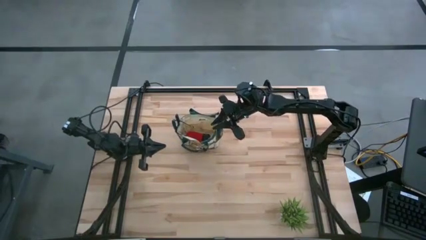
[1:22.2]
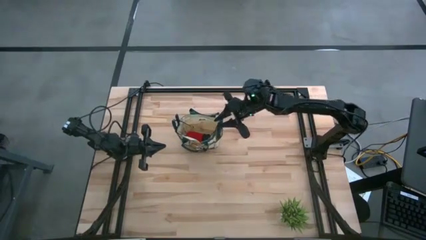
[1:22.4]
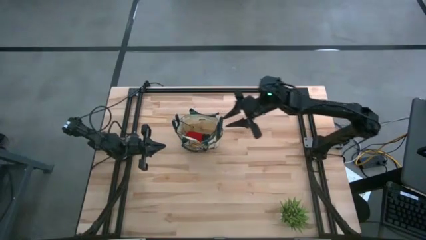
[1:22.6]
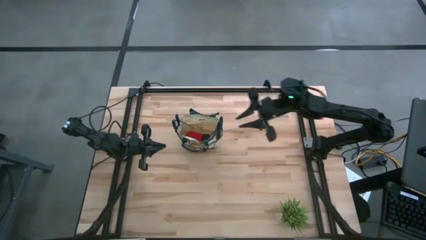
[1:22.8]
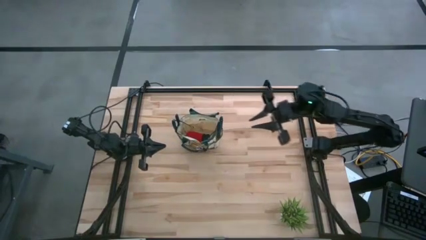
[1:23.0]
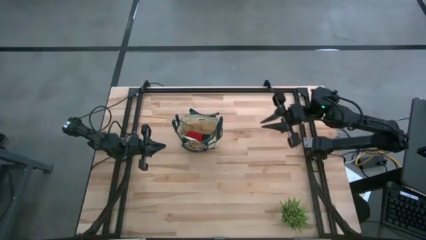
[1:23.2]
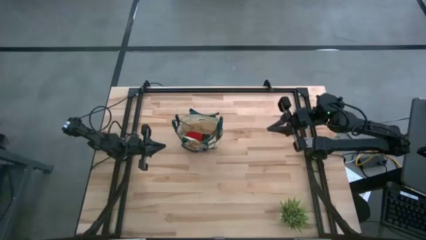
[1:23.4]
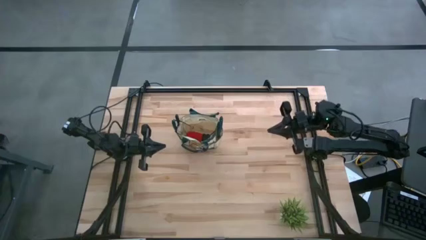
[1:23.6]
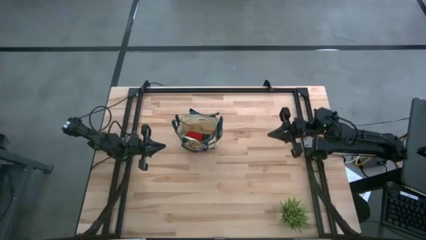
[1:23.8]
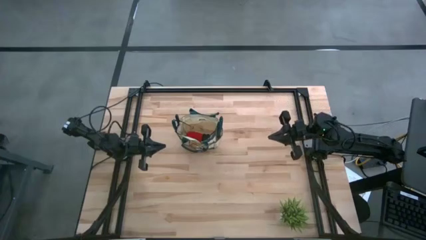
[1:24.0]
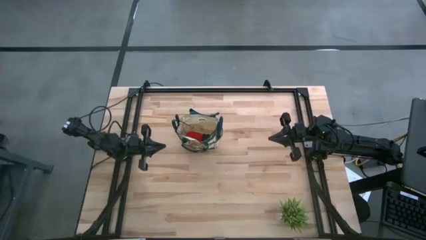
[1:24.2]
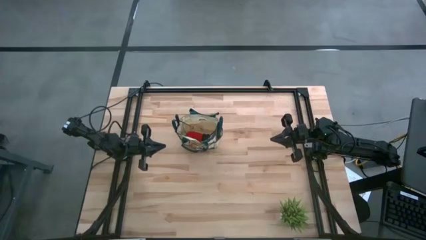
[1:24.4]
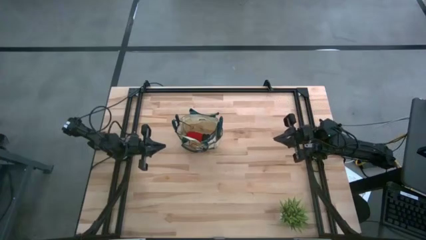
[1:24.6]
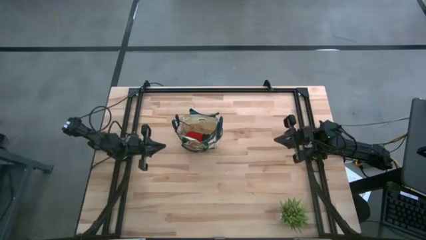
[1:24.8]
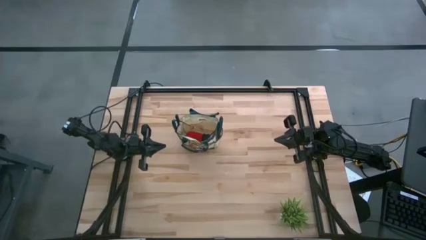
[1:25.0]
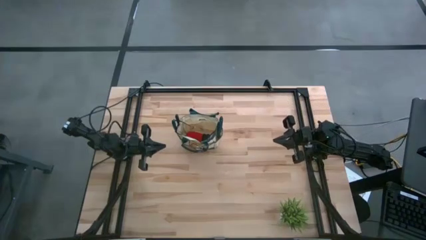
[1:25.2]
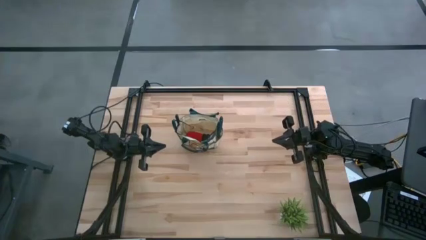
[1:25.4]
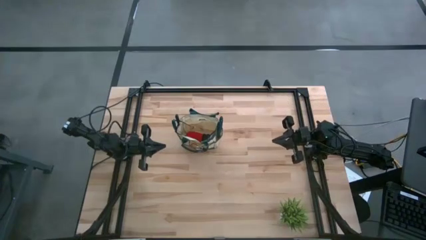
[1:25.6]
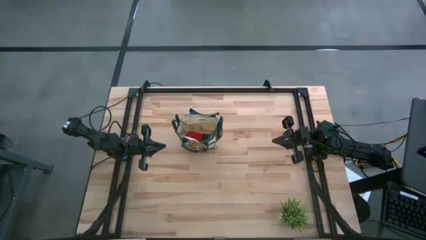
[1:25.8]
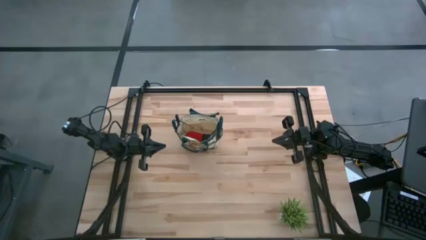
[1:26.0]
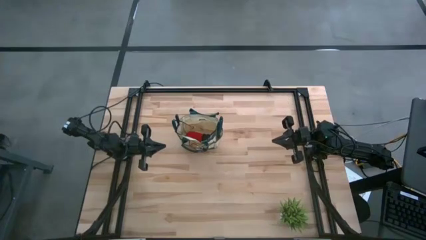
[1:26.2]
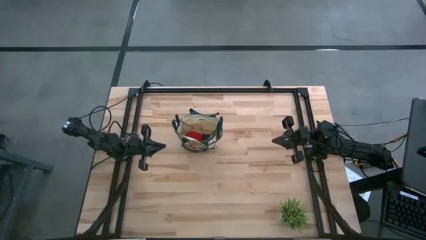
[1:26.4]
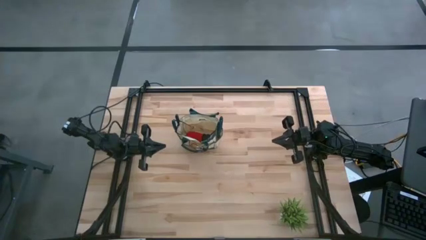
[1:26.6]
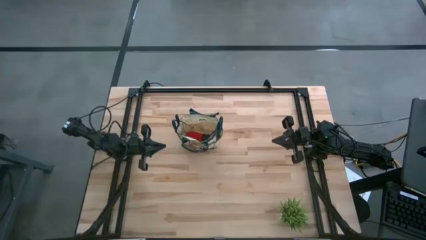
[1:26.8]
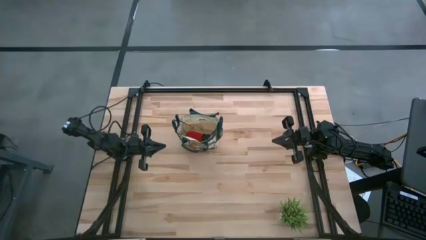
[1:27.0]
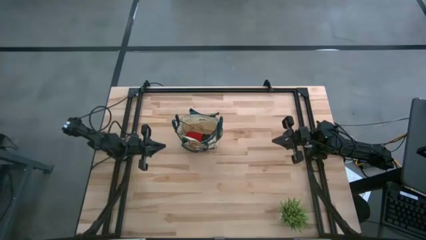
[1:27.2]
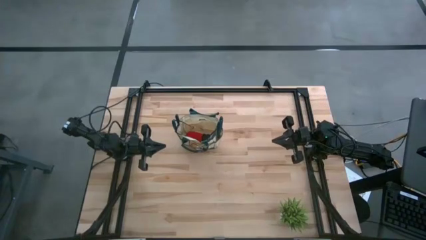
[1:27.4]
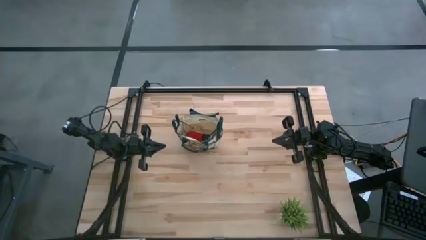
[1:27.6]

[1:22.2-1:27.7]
Task: Pick & Place Garden tools in Gardening bag
Return to Home Position

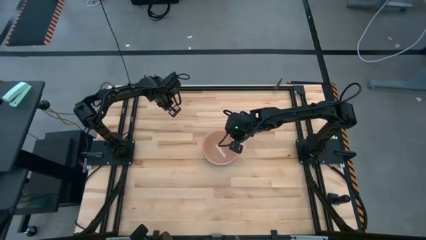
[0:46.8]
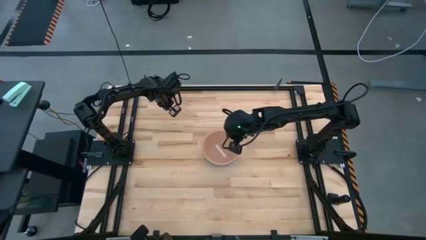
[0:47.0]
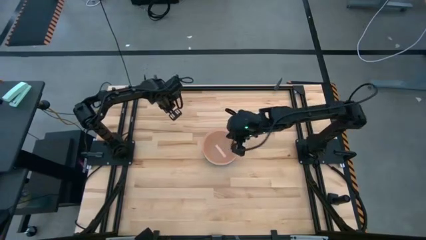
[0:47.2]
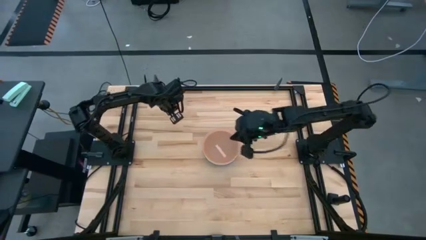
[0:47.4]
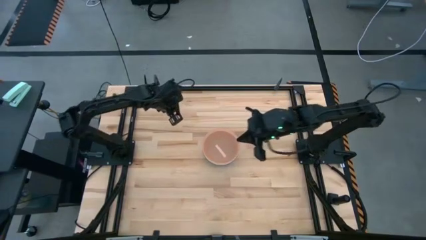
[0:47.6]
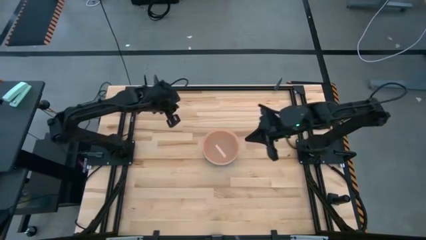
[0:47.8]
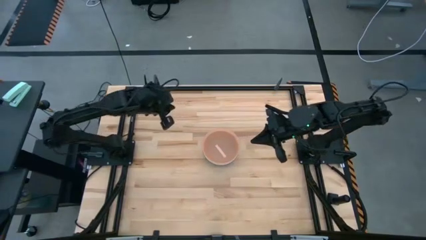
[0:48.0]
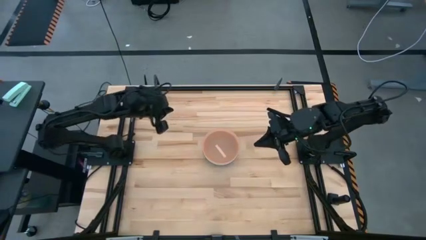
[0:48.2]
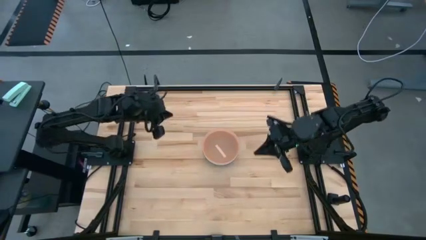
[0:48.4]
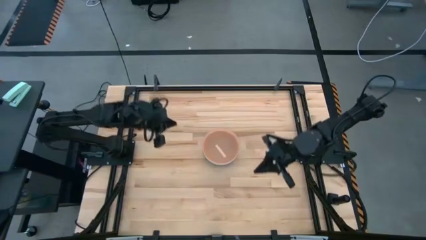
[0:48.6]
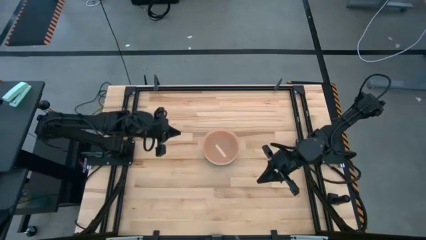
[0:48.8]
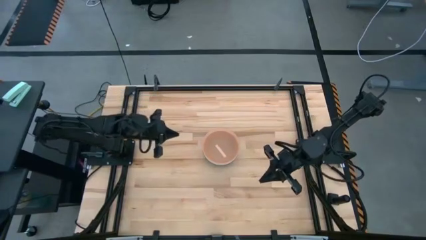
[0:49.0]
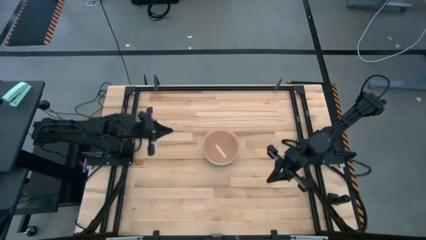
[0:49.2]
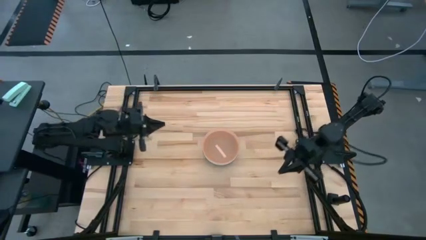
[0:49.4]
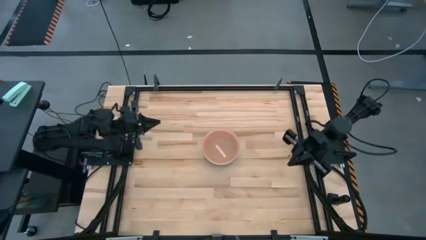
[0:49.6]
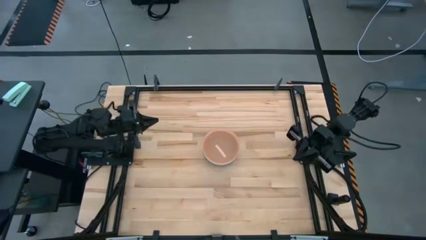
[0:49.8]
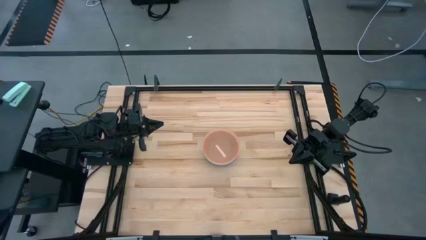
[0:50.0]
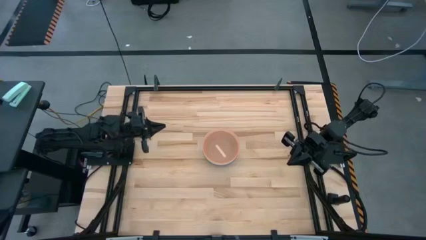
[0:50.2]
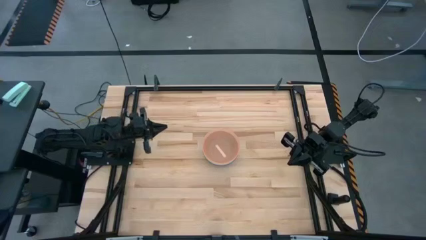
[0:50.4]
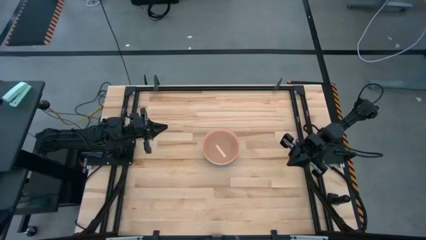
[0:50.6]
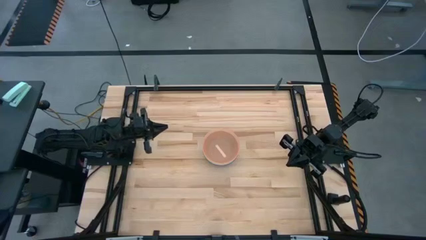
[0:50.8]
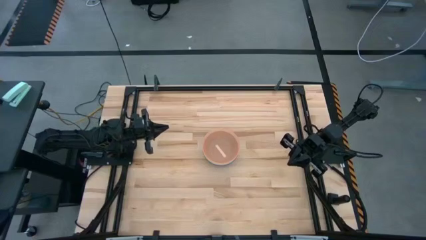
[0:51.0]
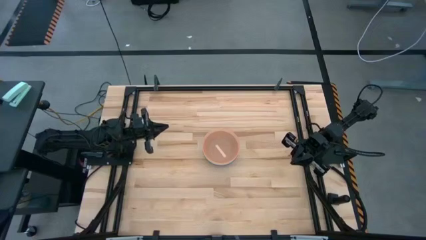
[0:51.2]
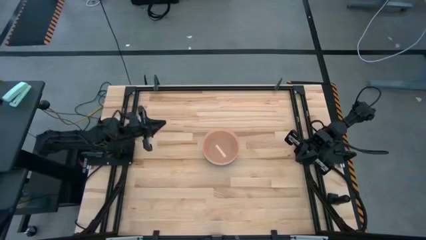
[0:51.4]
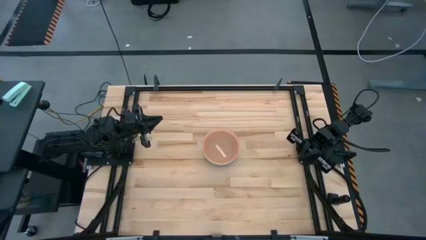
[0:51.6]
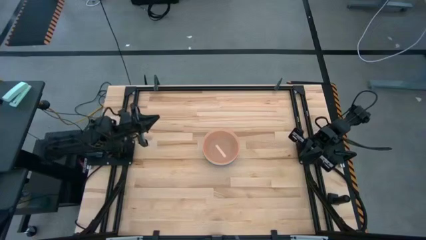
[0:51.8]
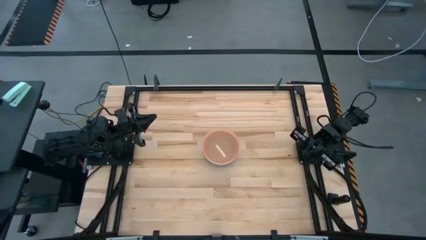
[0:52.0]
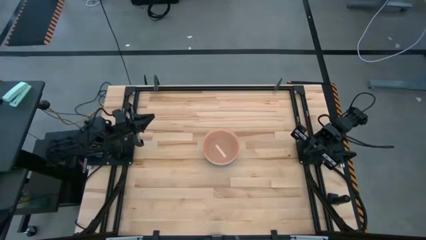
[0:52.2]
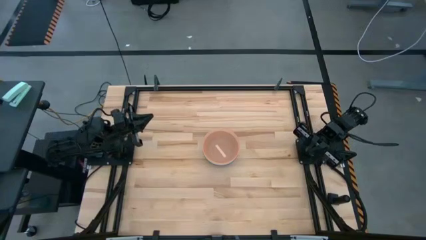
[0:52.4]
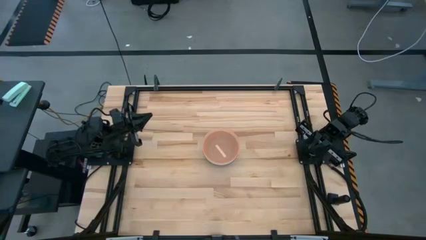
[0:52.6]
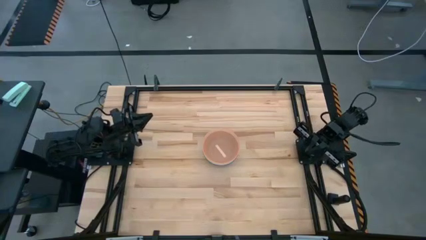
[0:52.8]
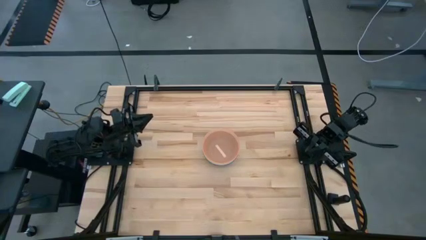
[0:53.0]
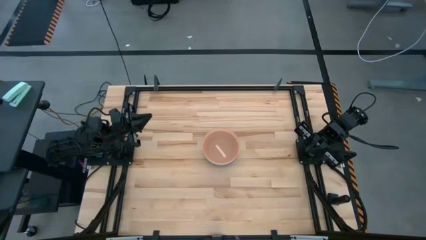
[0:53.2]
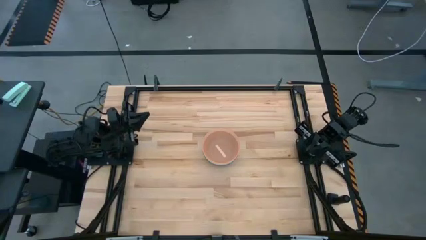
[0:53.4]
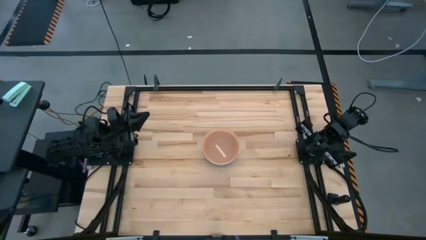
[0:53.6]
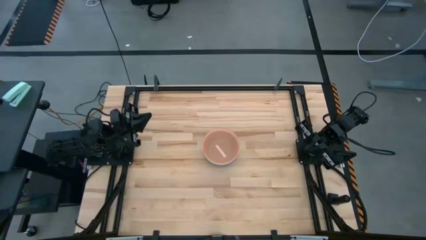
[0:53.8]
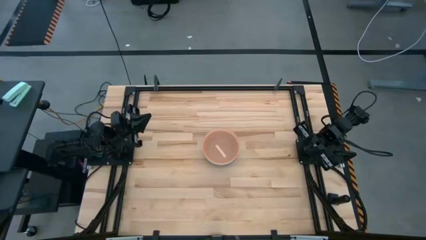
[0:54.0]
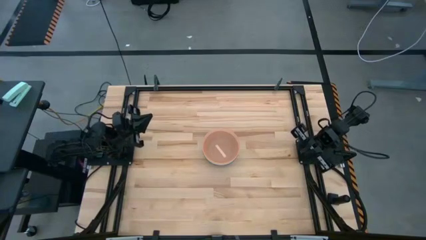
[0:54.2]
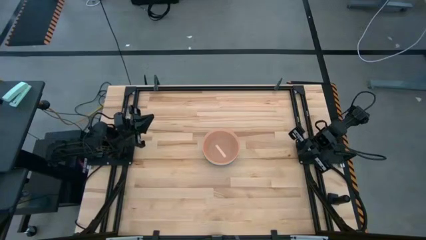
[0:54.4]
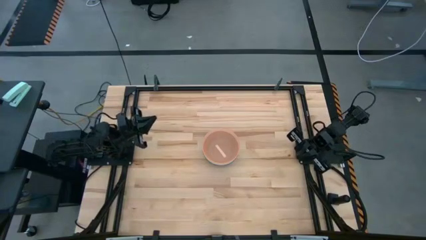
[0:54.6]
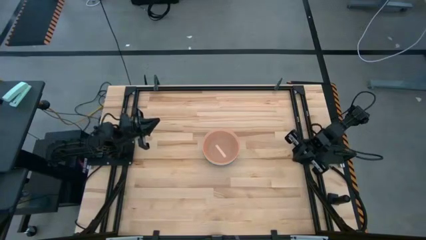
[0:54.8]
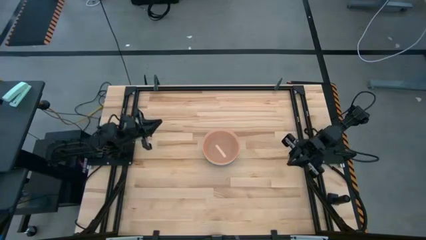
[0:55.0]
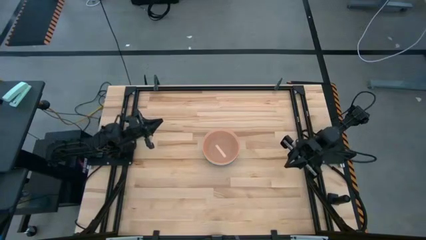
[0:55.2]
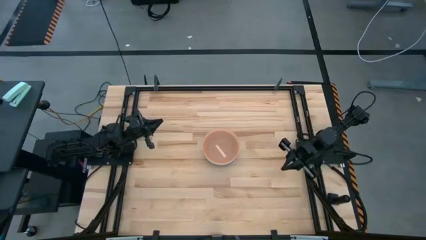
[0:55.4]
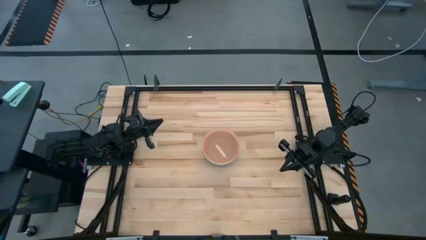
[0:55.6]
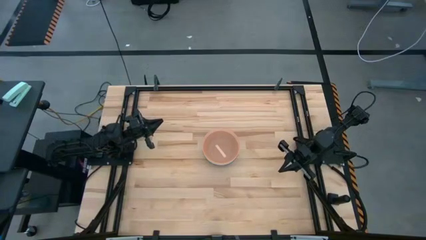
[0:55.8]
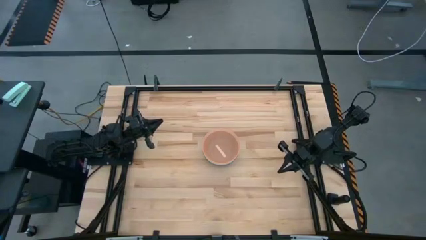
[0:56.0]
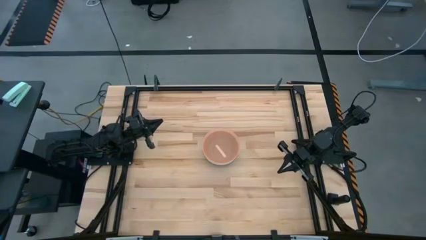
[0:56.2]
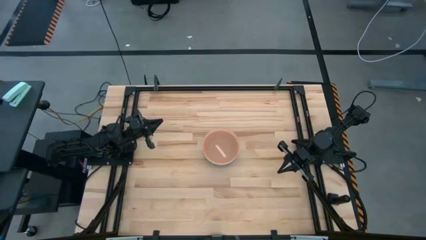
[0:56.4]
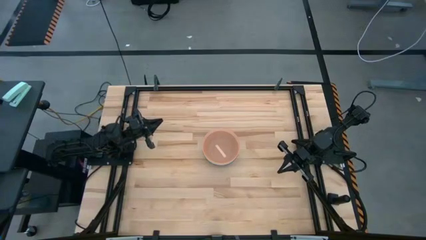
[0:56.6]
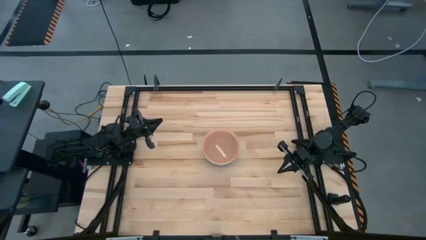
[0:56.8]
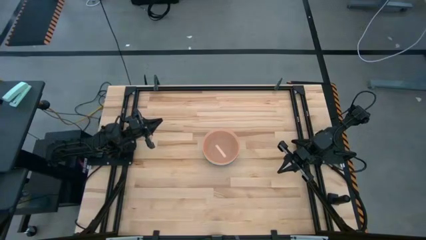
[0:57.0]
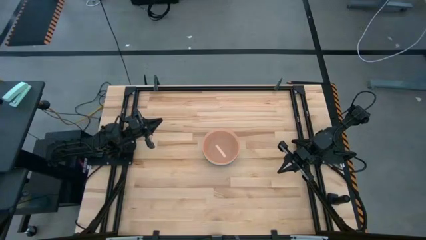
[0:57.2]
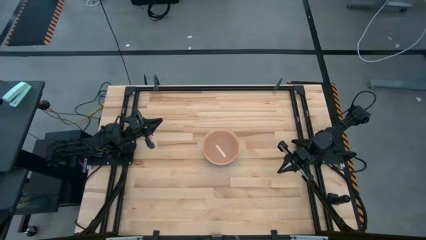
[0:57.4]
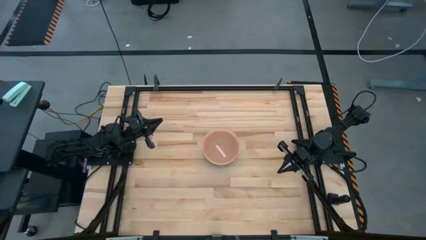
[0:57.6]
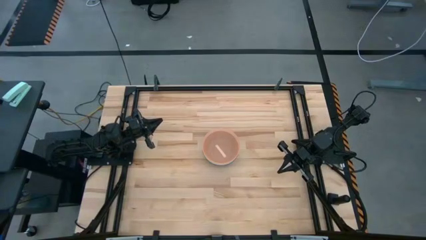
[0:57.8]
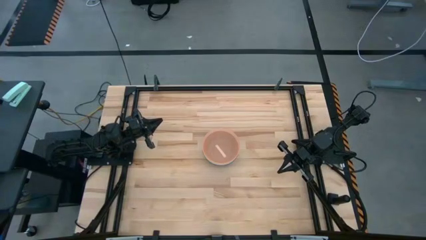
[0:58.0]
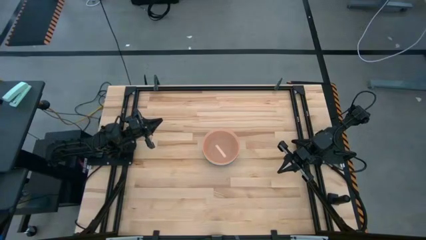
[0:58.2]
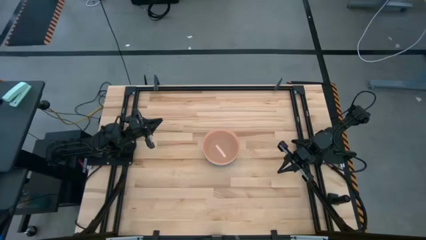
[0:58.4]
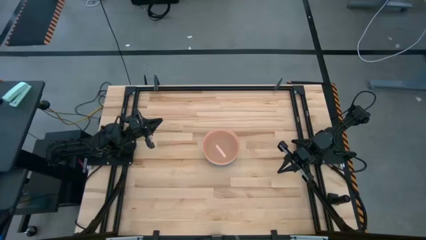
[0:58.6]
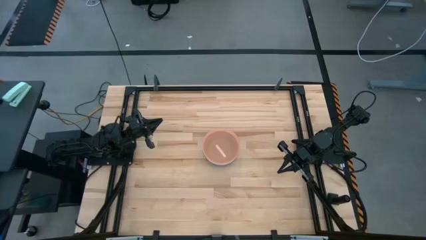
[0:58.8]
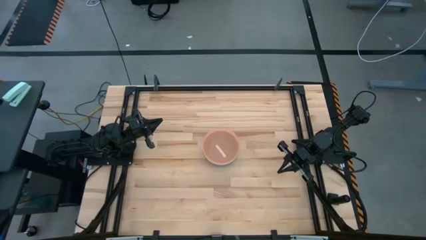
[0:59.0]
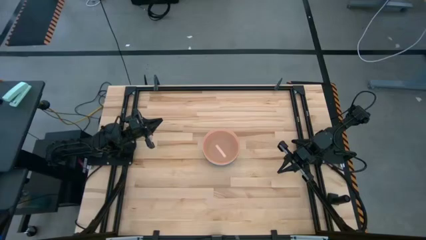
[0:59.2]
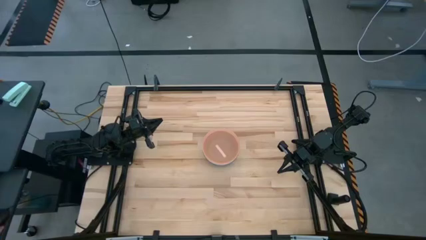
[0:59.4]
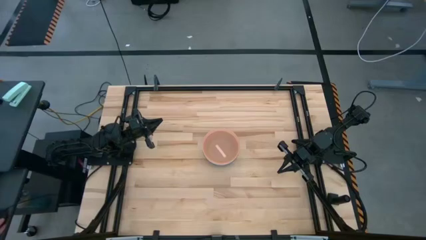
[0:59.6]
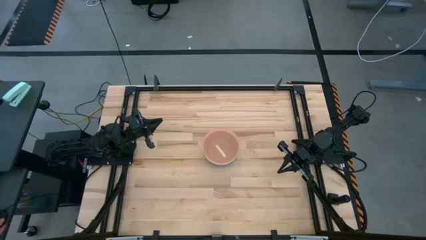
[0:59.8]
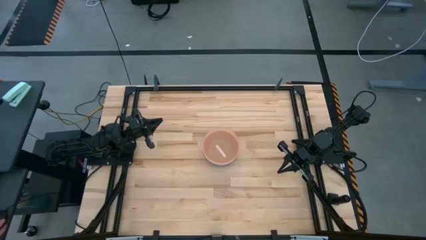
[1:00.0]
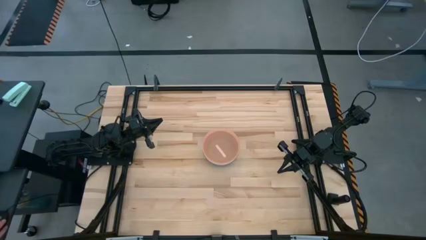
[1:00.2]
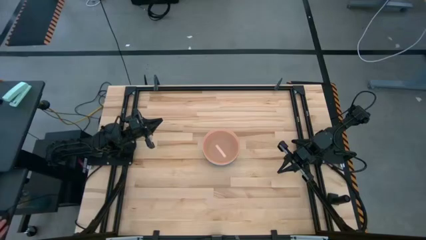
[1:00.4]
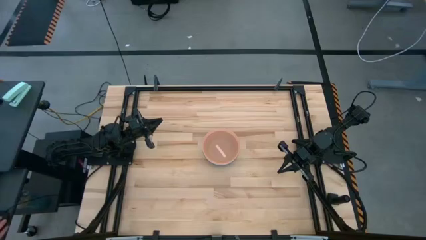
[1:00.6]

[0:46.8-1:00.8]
Task: Nest bowls inside each other
Return to Home Position
